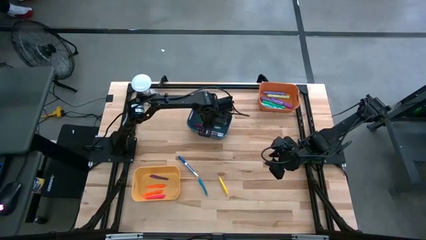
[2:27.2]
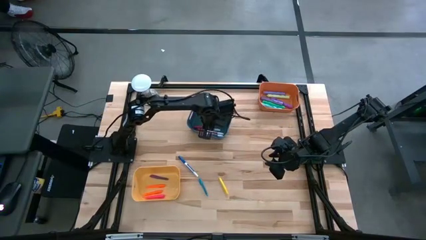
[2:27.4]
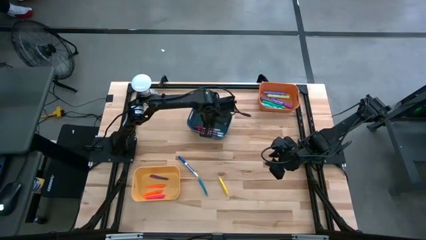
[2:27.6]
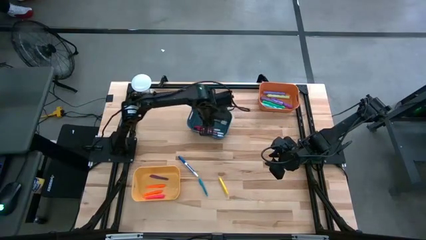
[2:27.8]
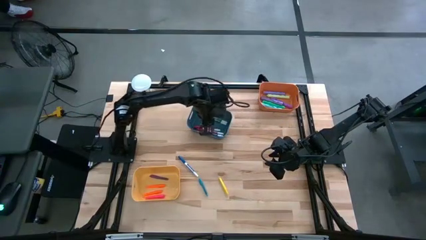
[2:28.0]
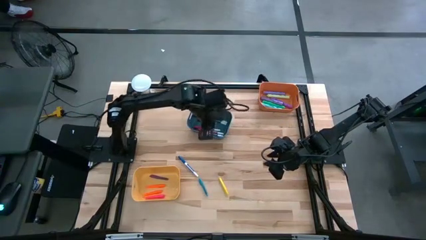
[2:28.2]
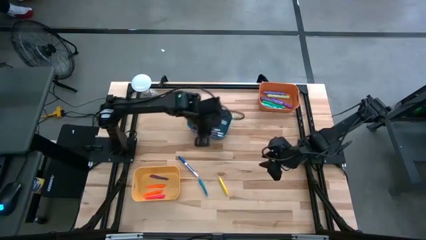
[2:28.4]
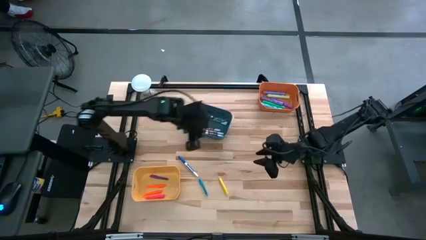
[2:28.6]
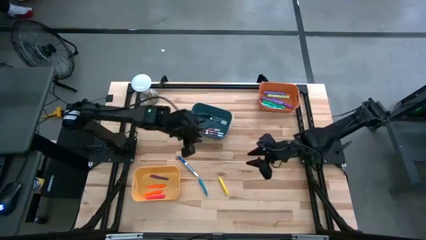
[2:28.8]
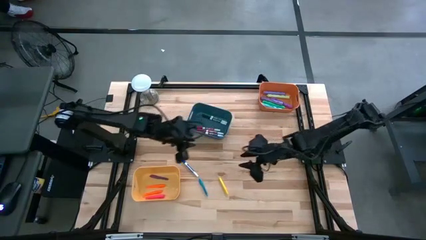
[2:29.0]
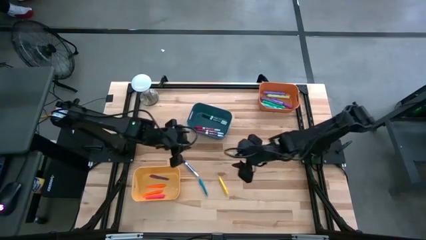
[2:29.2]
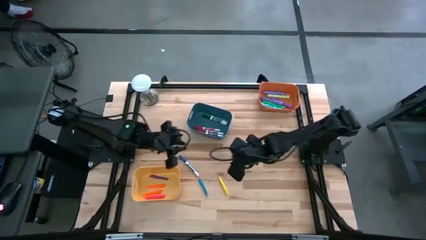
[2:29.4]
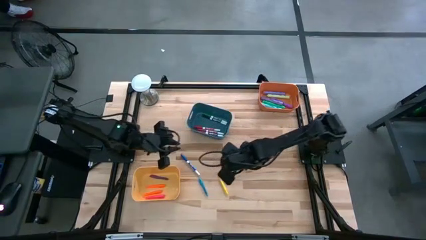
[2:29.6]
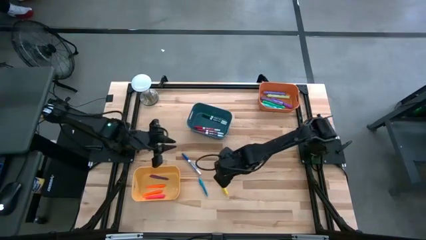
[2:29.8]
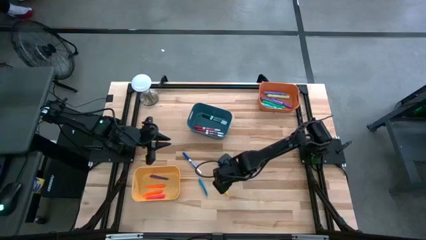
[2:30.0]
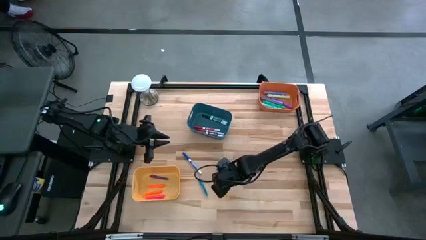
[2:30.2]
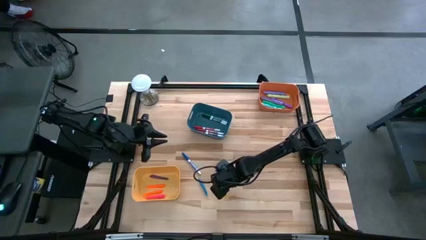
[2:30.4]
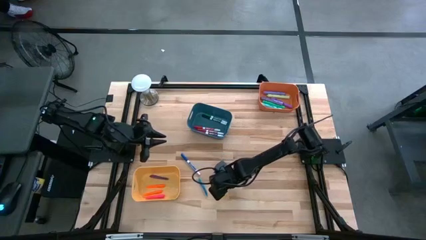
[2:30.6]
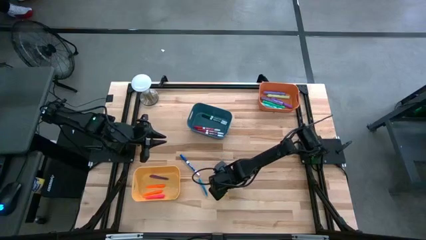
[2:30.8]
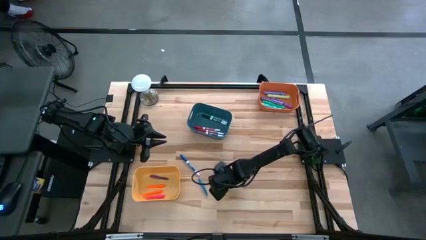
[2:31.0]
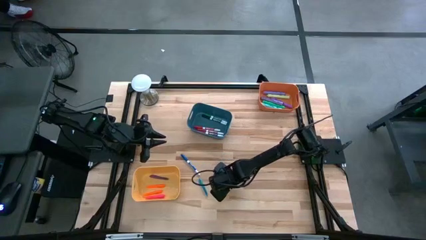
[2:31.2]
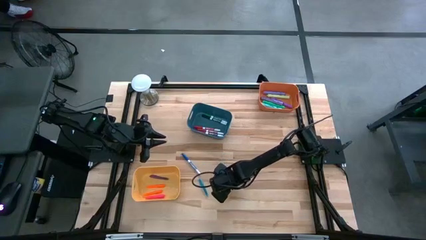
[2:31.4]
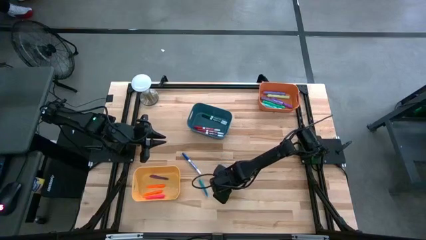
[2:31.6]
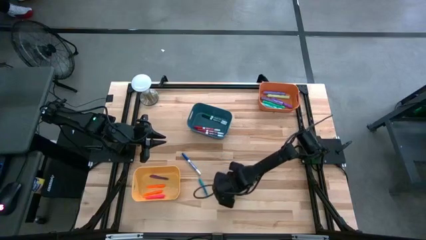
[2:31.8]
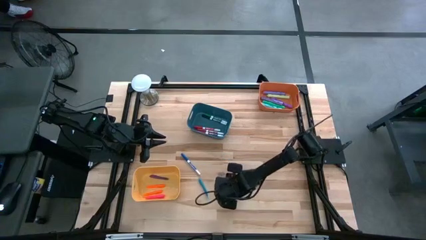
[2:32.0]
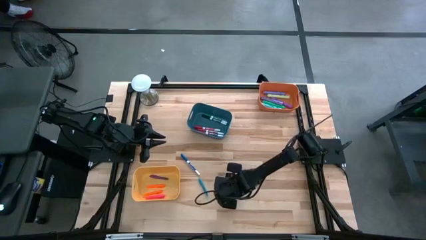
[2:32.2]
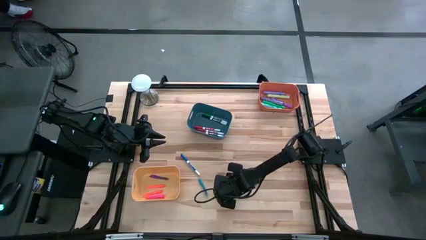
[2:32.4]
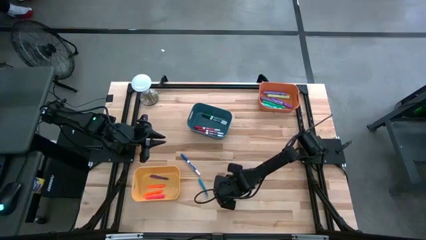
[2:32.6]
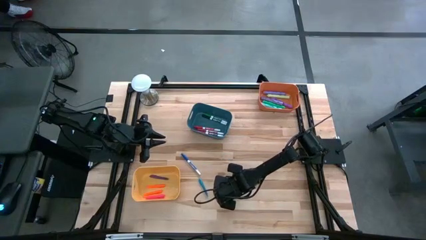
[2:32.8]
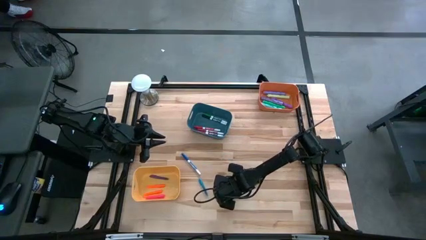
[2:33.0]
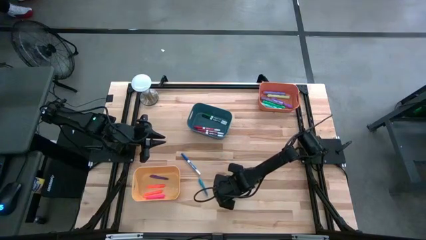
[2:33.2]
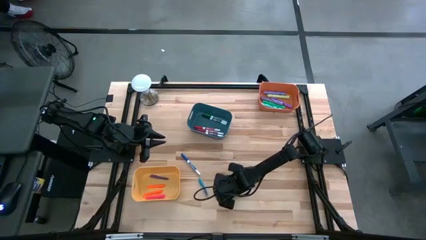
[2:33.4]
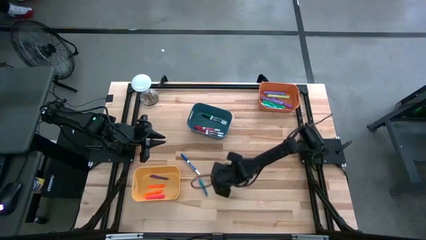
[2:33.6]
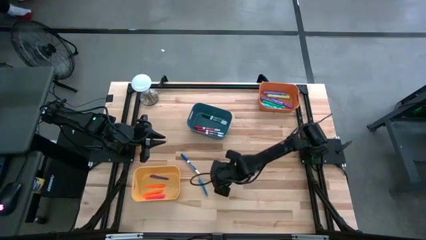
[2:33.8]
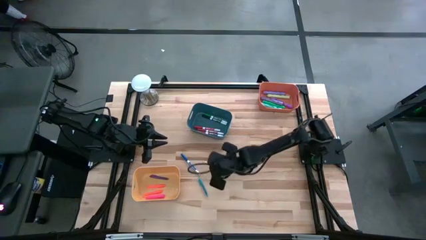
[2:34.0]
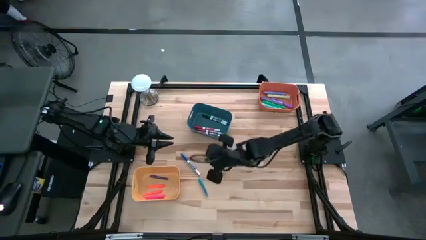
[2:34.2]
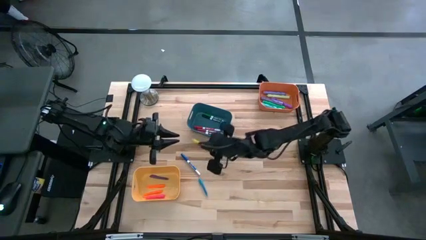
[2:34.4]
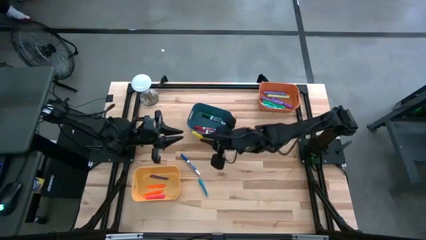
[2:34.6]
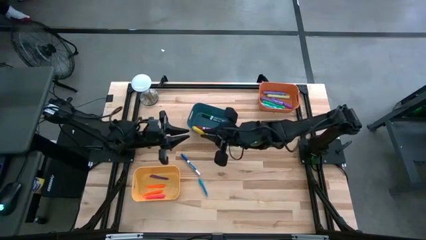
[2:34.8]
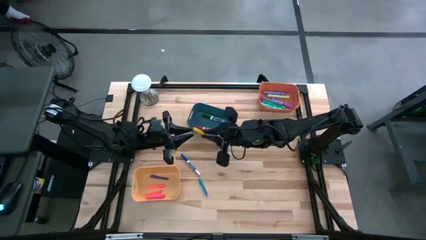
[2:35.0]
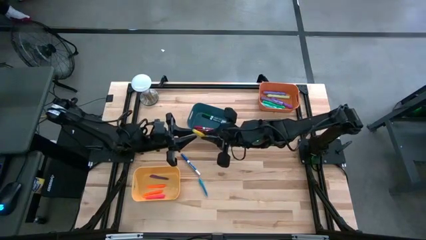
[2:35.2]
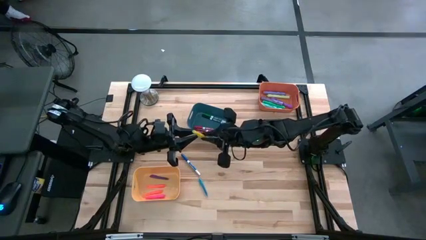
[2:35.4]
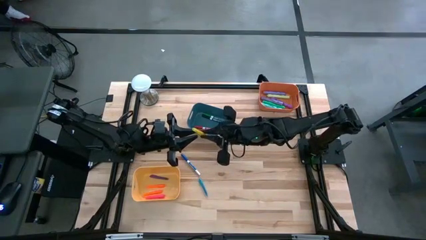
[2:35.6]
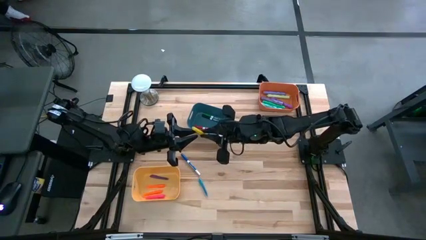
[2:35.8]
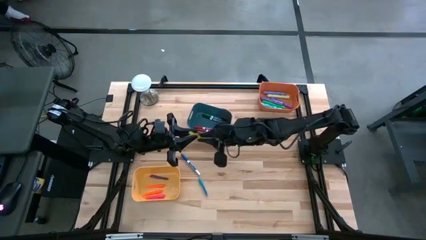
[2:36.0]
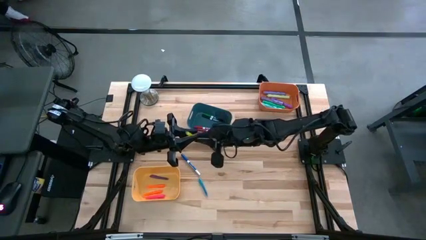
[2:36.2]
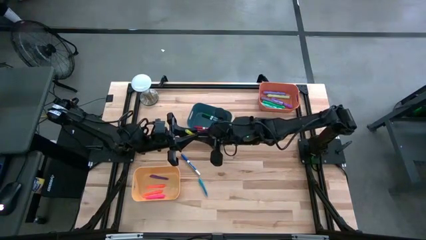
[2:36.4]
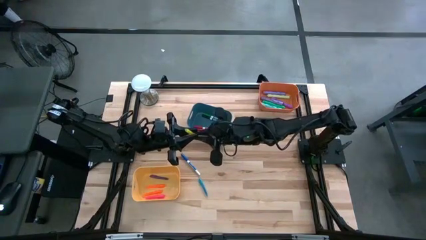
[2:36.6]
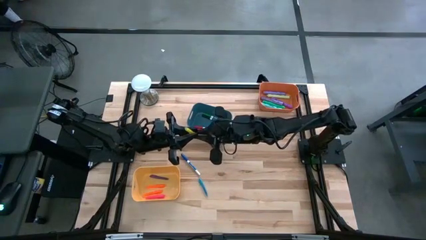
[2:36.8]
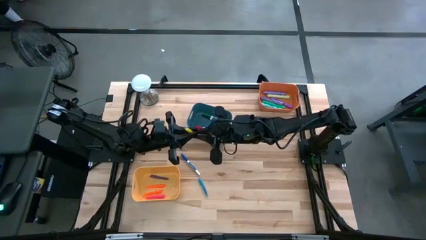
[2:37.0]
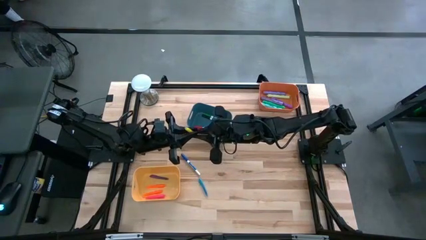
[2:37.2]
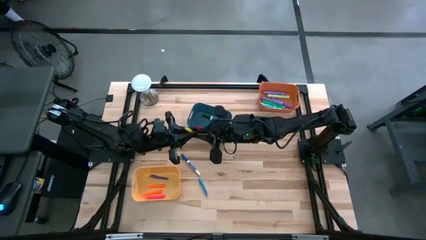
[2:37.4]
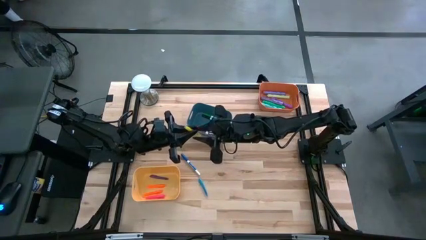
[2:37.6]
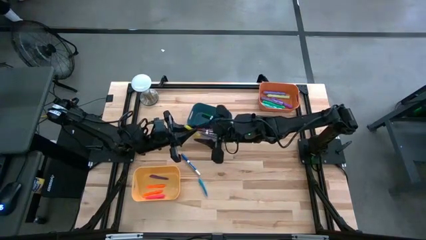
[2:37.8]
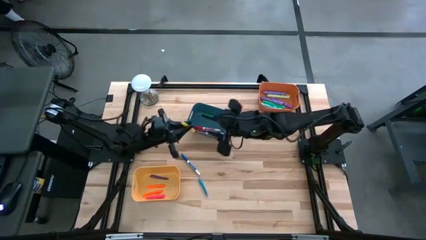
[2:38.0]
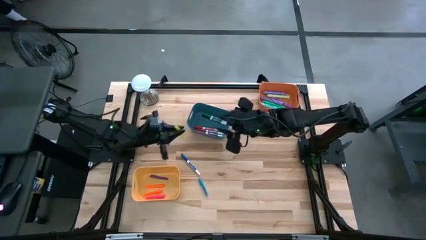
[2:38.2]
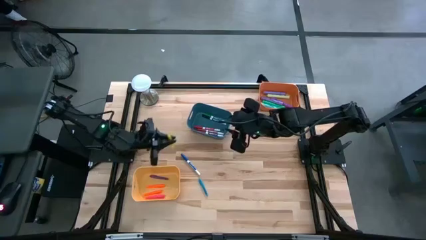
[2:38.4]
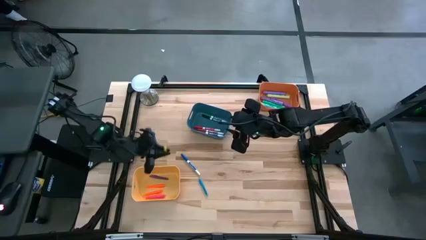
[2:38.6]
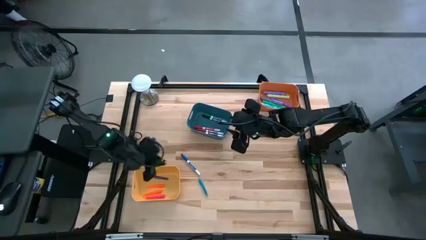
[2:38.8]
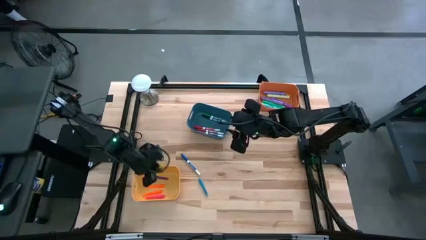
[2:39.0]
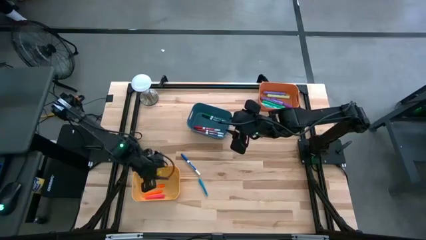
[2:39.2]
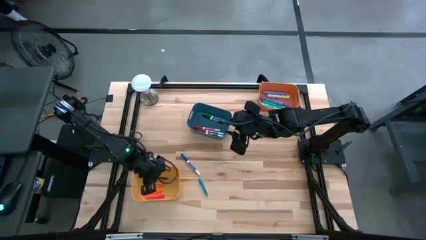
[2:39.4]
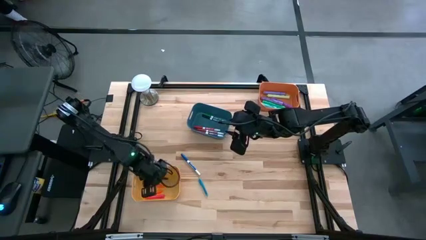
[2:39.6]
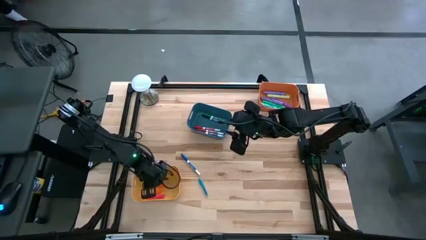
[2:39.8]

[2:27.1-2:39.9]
Task: Pick & Place Markers
Put the yellow pen into the yellow bin
